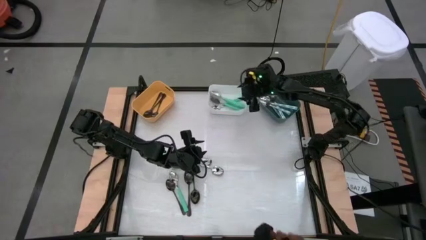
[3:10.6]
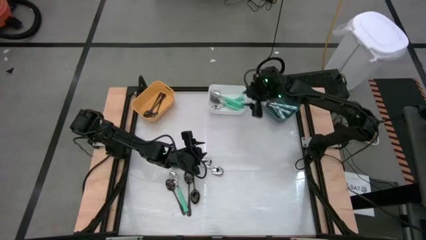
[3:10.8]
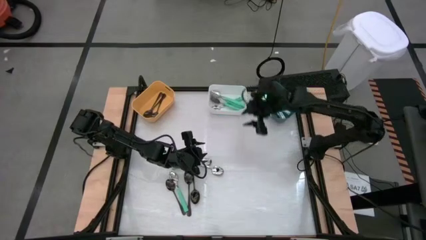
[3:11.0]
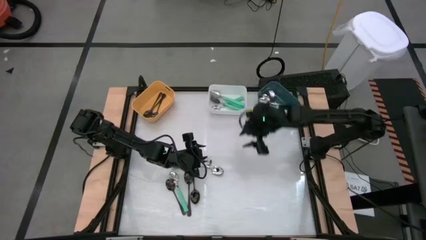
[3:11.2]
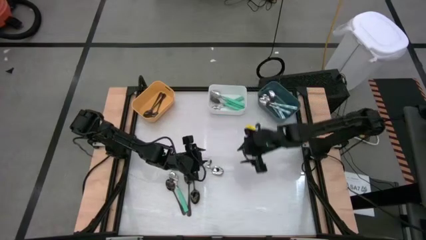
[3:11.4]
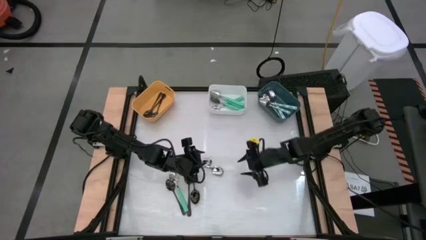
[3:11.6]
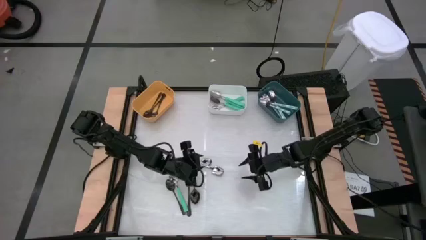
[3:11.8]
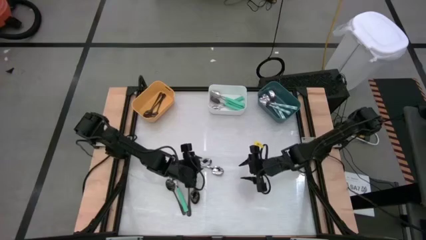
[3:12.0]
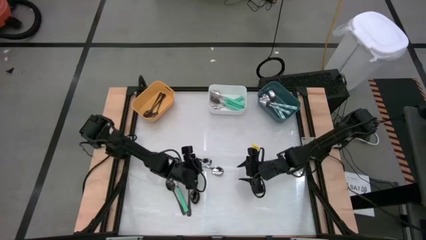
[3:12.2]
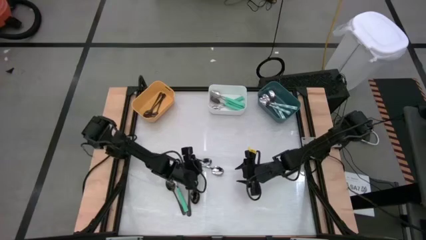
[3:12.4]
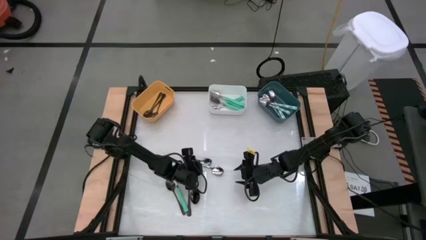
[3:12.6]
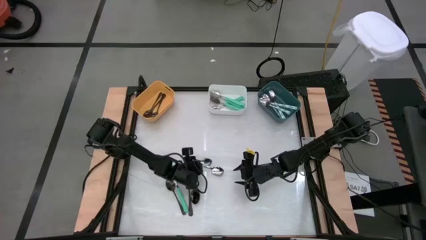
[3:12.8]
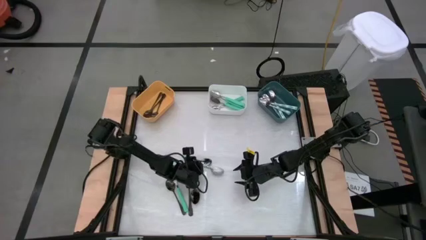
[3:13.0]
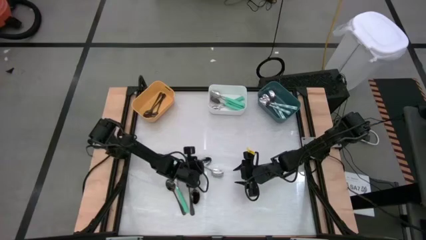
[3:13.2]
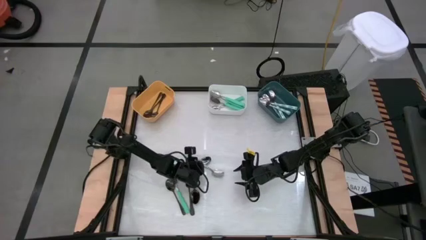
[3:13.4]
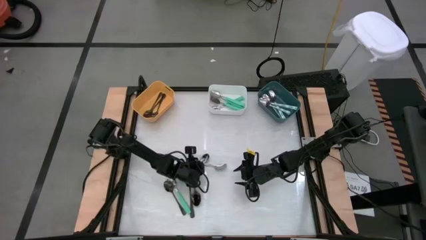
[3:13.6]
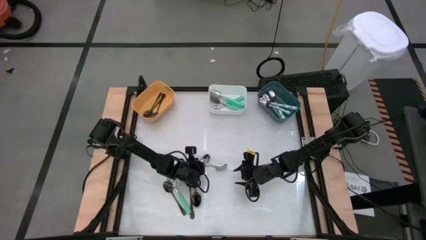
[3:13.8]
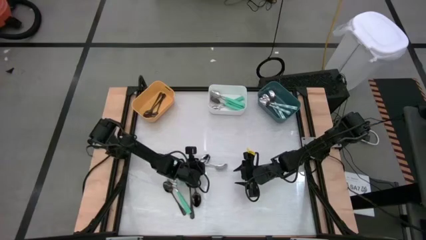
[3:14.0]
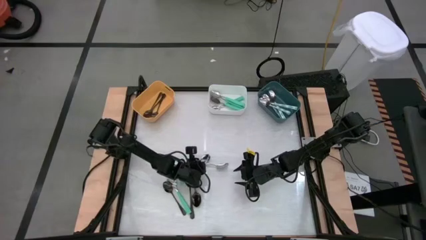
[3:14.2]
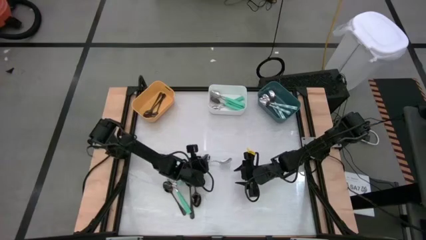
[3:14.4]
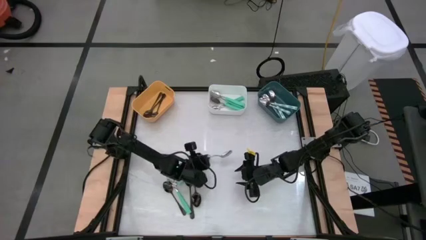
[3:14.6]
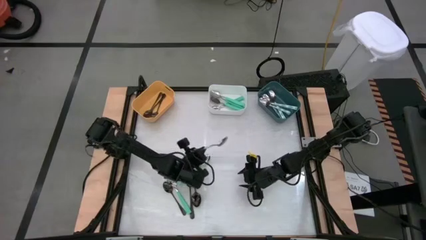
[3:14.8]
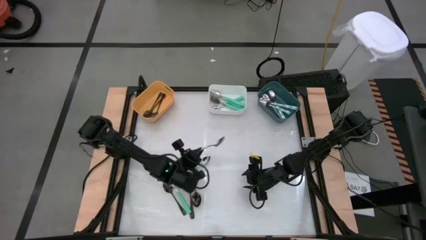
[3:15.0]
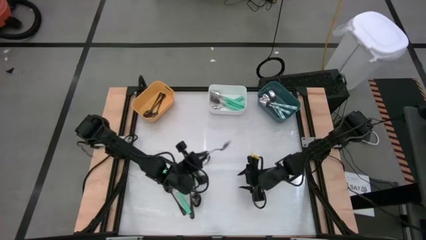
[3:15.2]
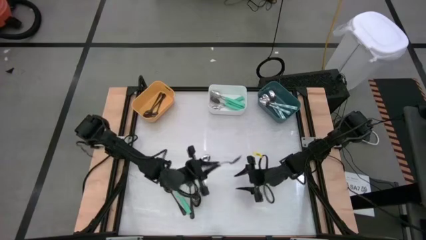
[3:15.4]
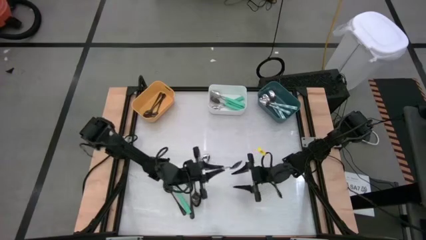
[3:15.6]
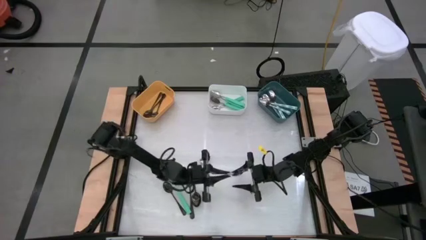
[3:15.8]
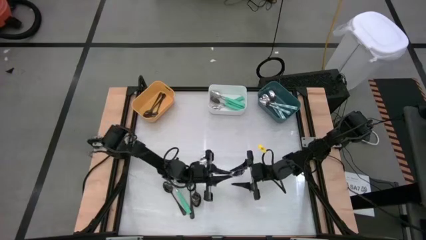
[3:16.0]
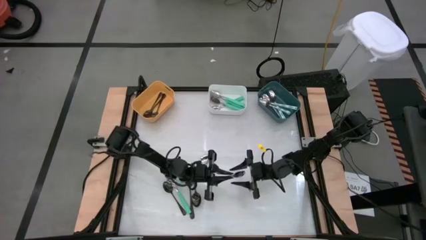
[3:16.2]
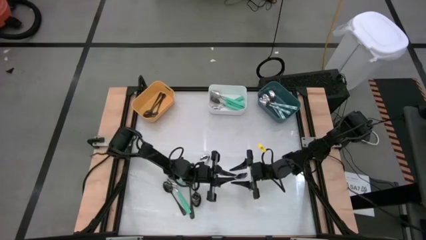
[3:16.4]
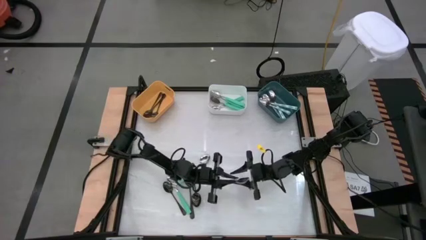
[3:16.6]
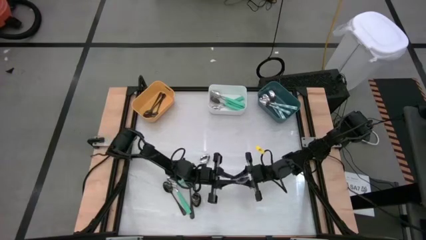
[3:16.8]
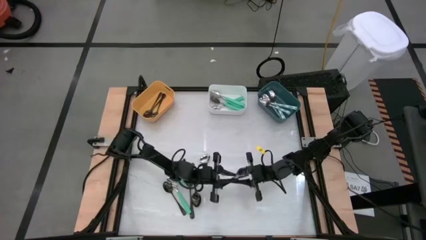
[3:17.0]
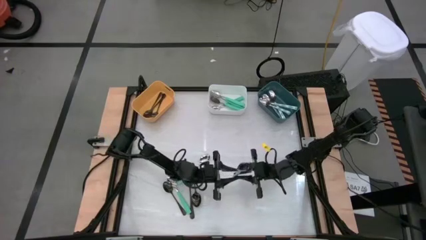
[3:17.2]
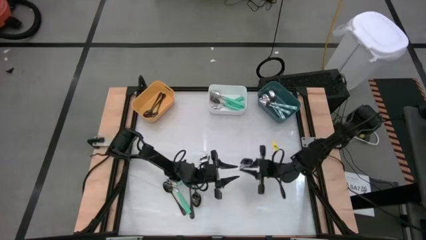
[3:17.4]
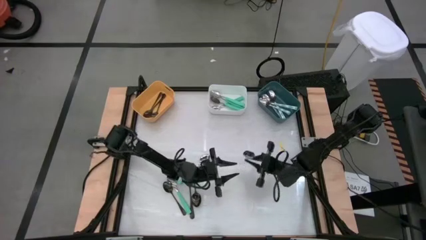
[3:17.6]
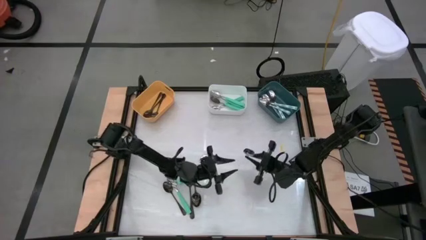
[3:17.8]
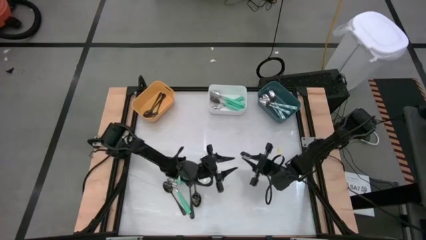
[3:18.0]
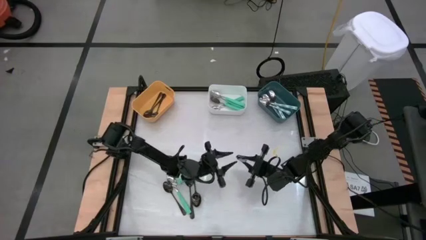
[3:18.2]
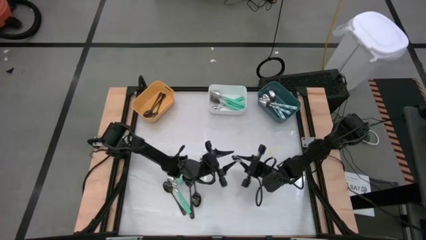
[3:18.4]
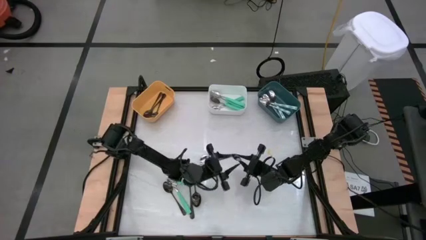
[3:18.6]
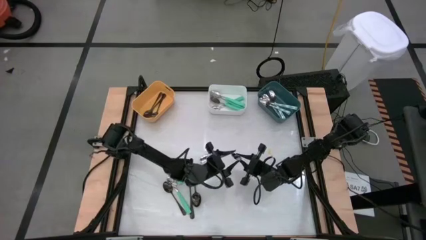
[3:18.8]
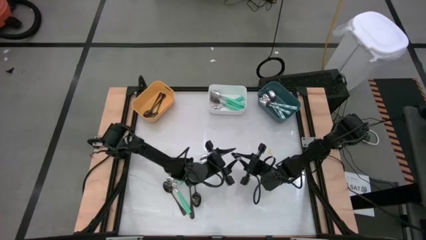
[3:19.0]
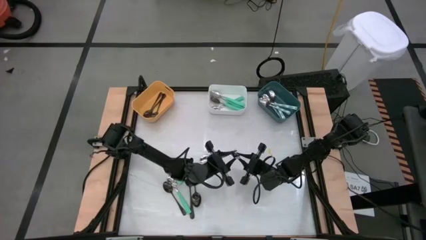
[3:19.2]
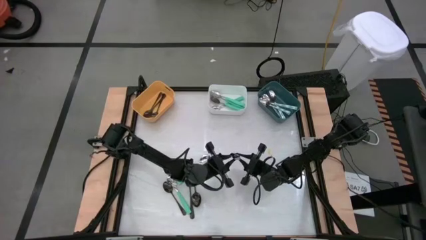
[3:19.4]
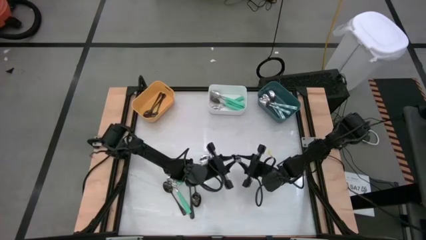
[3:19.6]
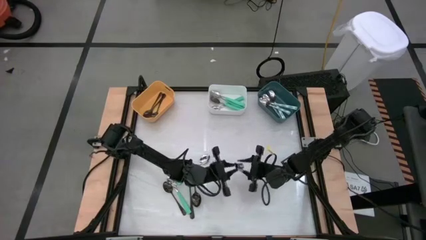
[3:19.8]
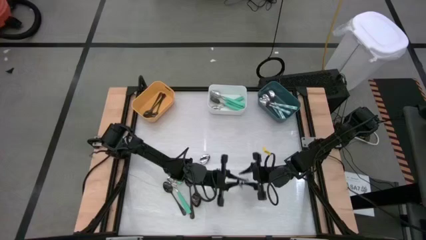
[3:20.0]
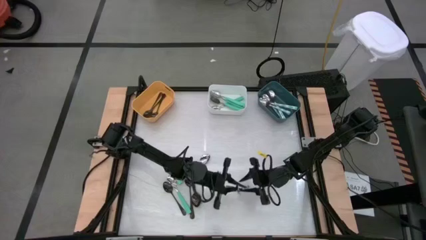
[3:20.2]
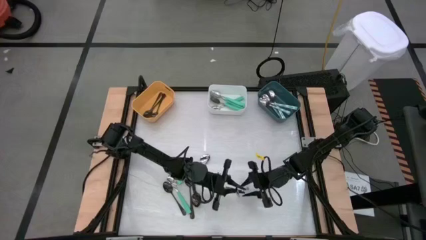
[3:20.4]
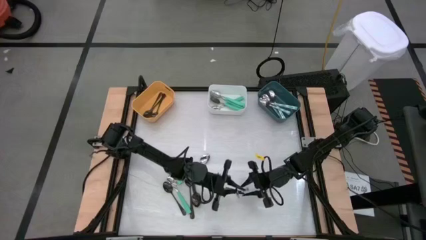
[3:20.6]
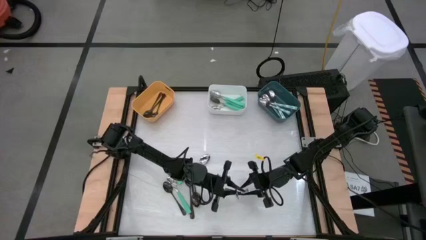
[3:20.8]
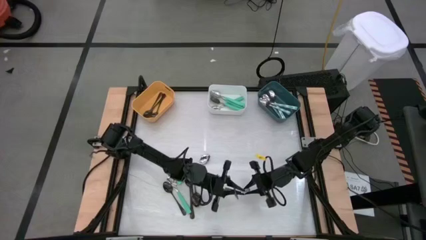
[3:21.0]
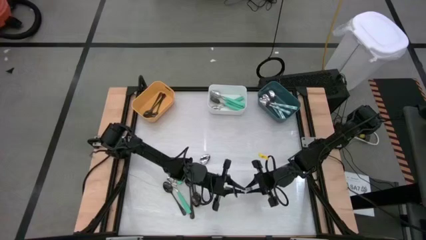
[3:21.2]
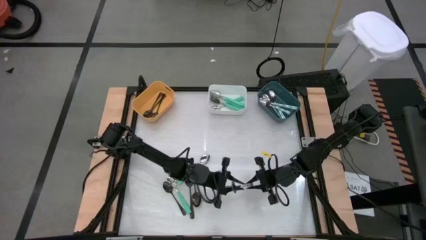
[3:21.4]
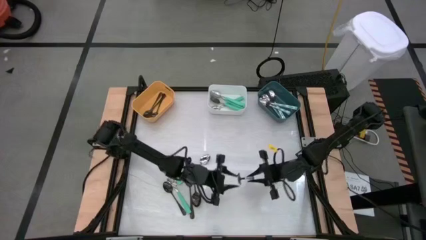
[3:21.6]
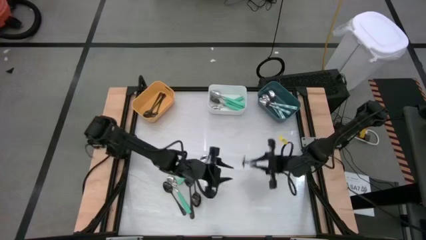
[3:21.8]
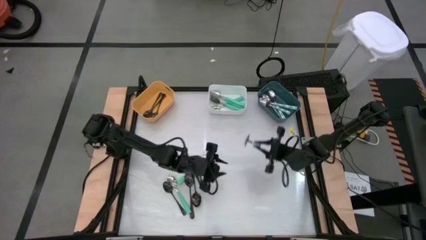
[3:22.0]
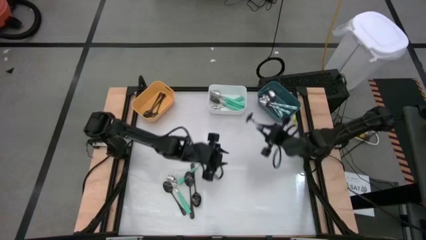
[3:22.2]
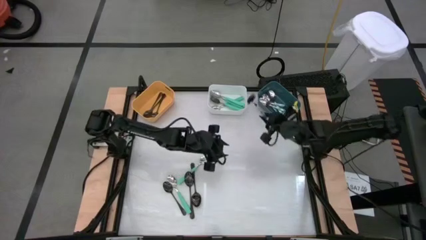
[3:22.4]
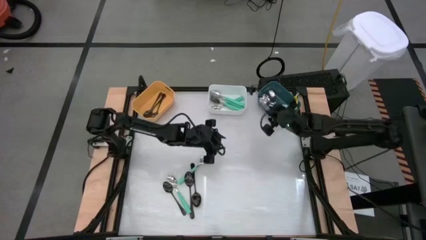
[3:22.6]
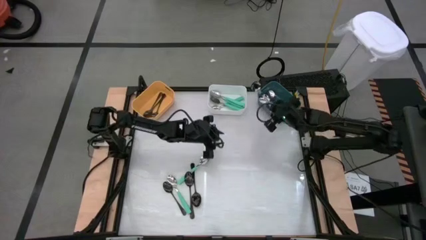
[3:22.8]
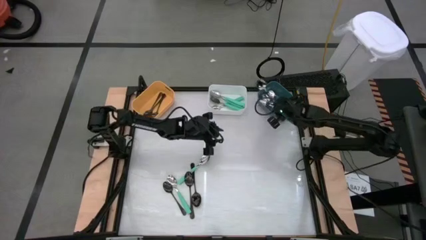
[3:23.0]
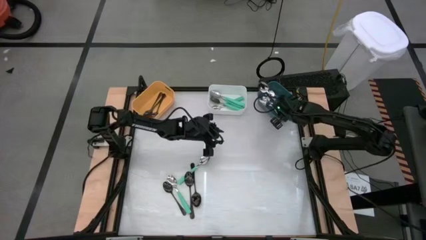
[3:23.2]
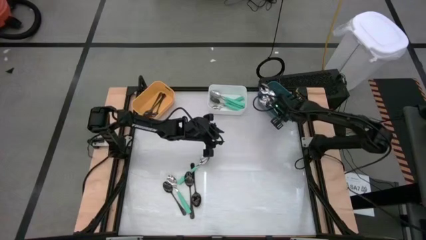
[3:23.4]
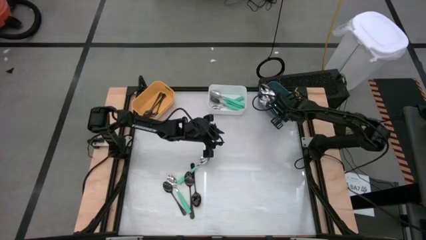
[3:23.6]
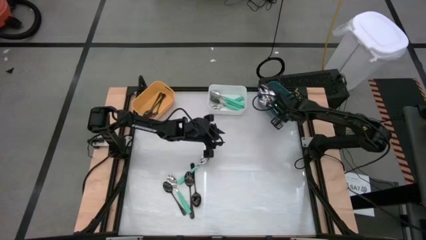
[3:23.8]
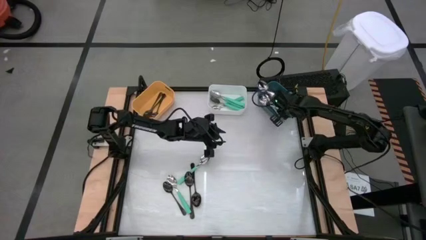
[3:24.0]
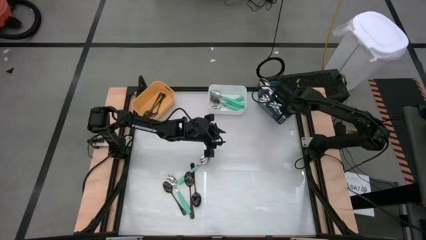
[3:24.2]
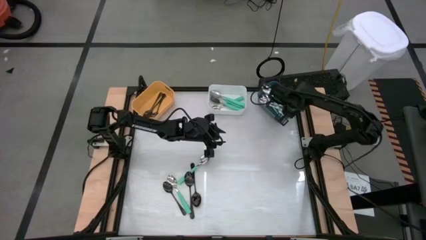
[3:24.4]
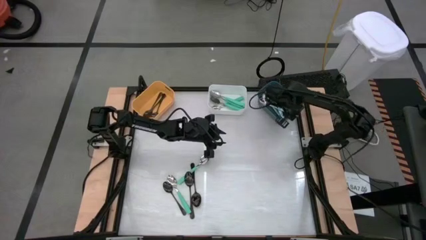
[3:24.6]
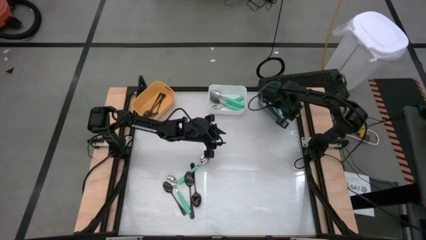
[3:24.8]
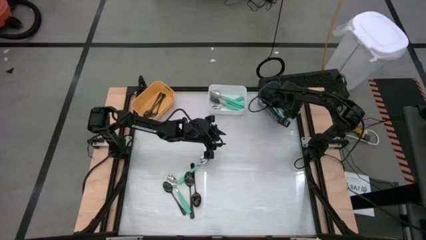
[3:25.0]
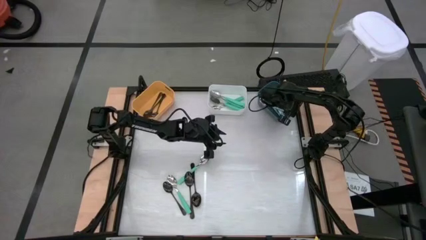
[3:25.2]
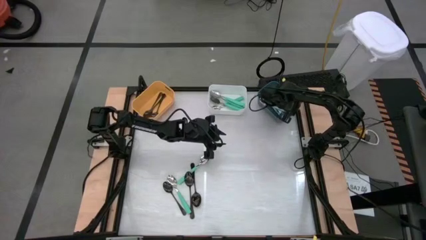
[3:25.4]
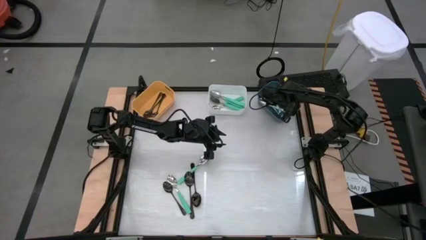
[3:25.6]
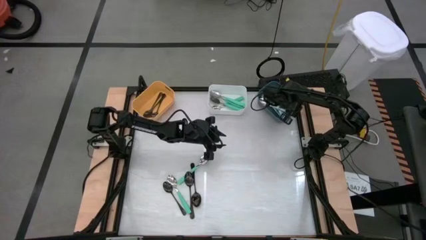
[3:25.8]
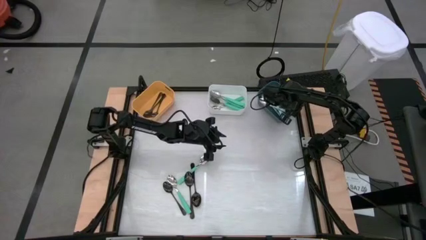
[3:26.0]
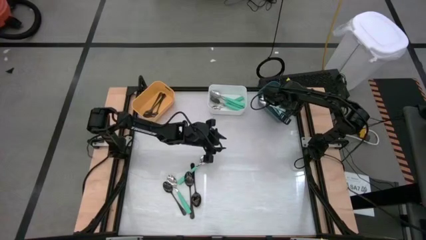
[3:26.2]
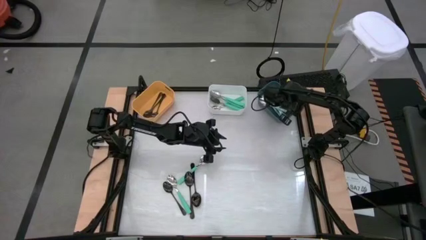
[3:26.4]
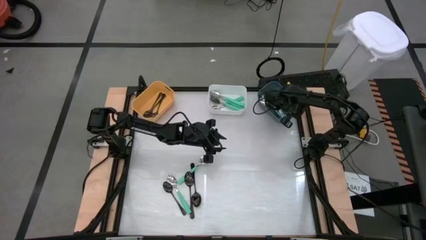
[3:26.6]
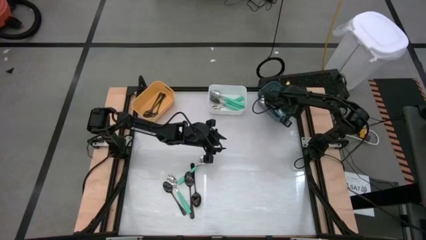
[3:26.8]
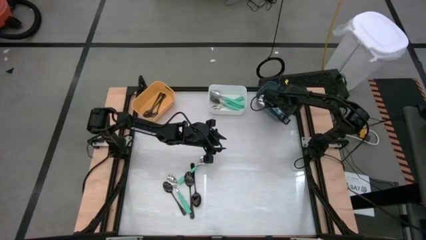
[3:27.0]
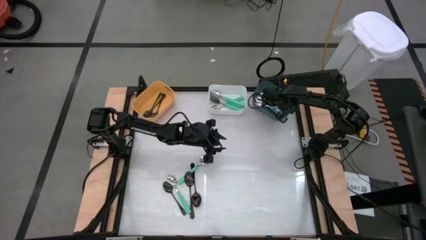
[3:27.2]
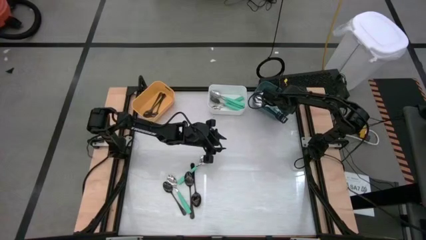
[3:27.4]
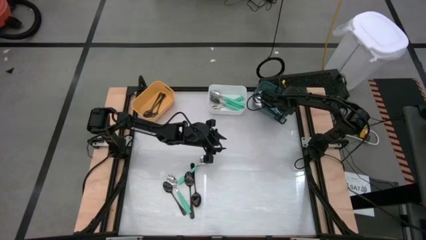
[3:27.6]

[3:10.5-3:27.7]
Task: Sort silverware by color (type)
Put the blue patterned spoon into the blue bin
